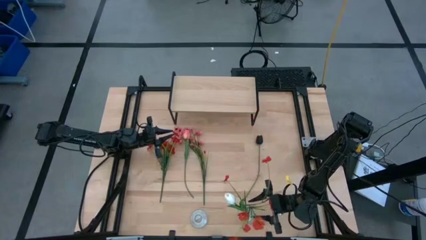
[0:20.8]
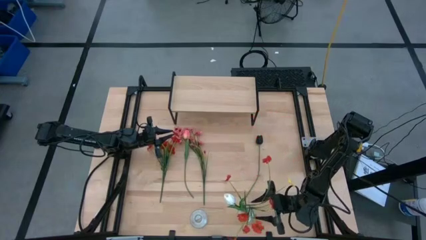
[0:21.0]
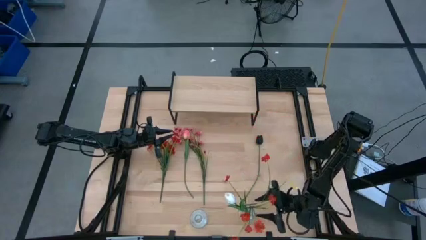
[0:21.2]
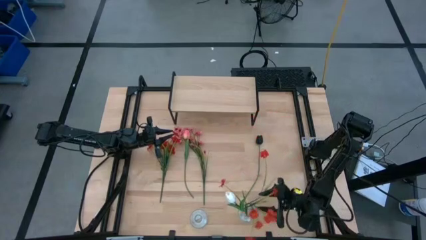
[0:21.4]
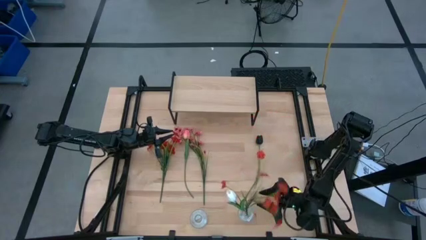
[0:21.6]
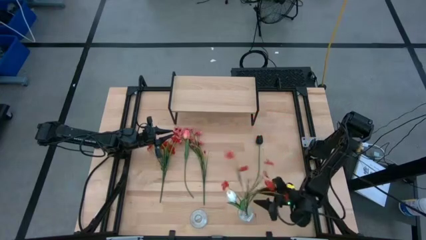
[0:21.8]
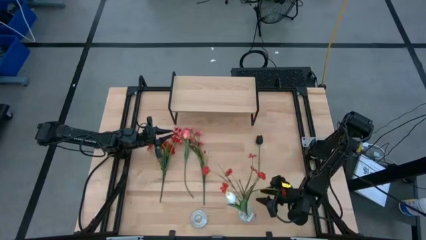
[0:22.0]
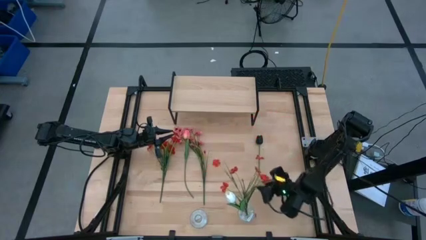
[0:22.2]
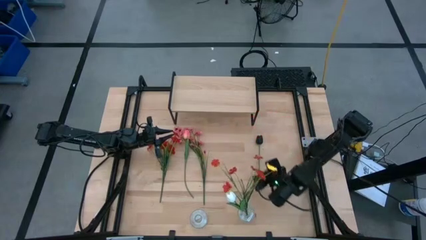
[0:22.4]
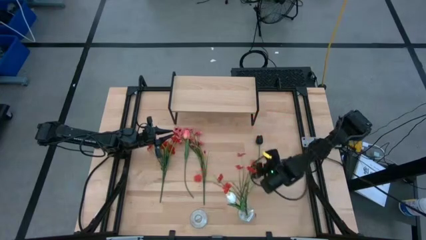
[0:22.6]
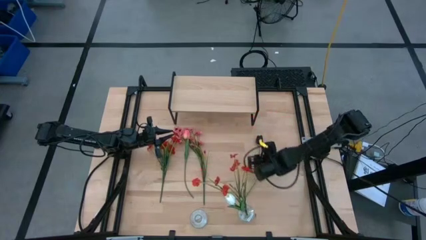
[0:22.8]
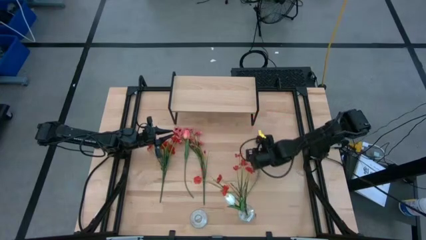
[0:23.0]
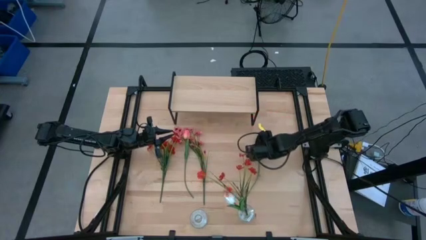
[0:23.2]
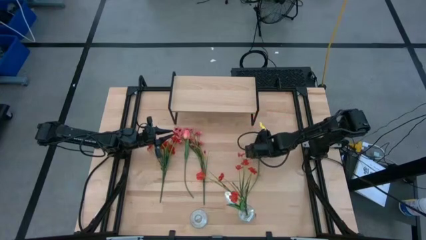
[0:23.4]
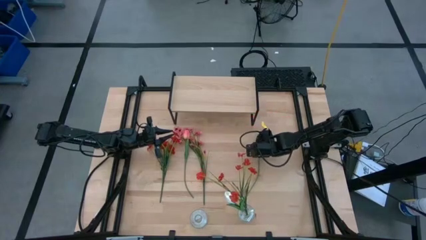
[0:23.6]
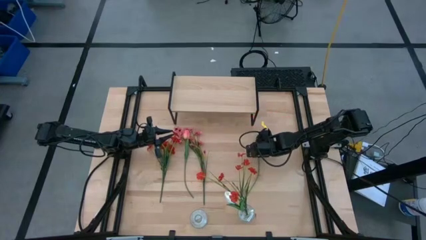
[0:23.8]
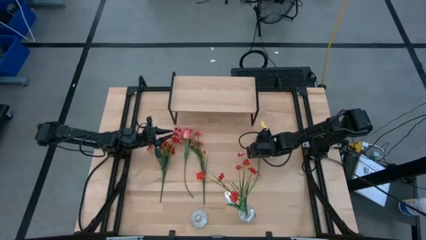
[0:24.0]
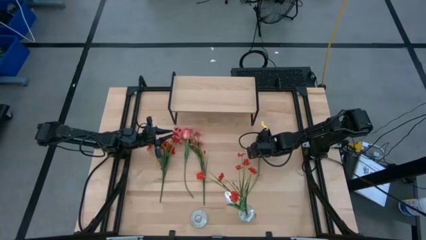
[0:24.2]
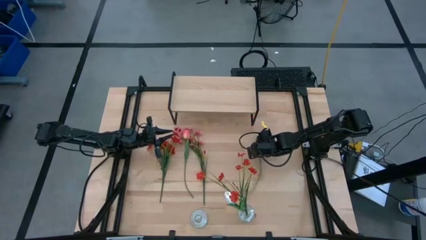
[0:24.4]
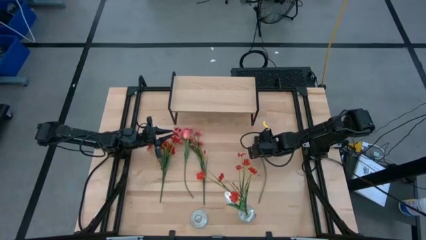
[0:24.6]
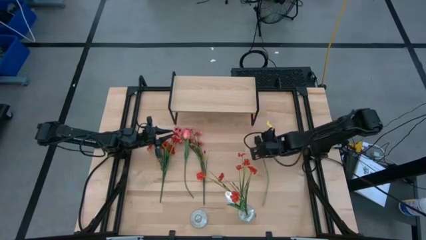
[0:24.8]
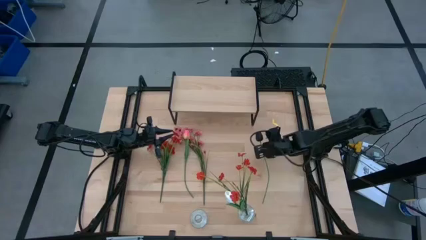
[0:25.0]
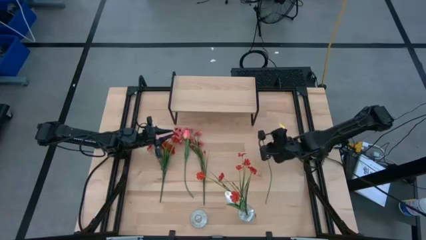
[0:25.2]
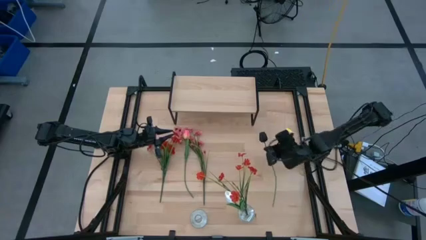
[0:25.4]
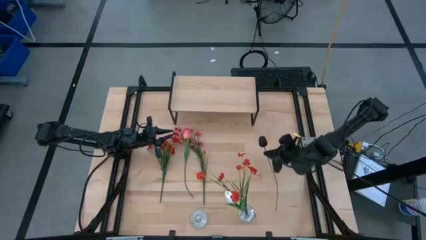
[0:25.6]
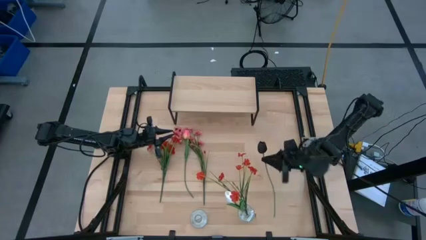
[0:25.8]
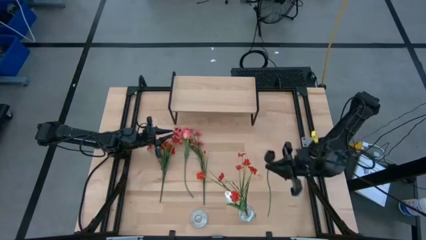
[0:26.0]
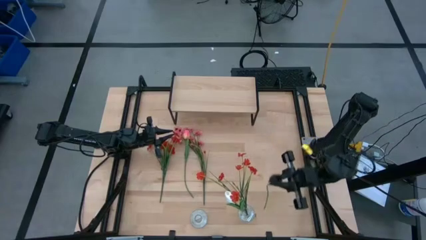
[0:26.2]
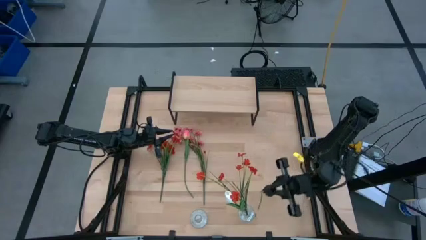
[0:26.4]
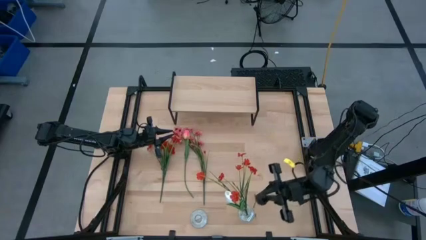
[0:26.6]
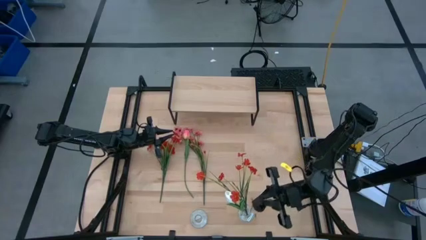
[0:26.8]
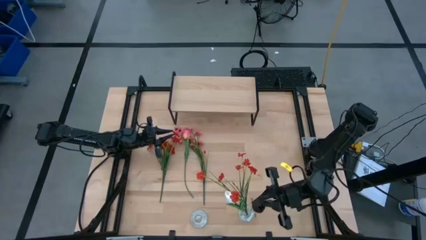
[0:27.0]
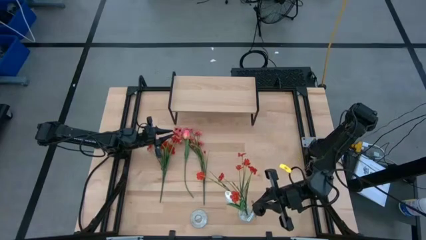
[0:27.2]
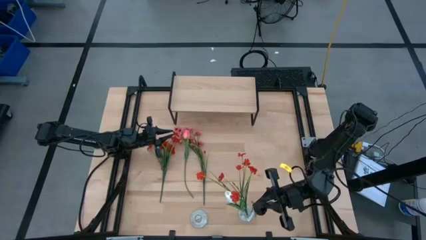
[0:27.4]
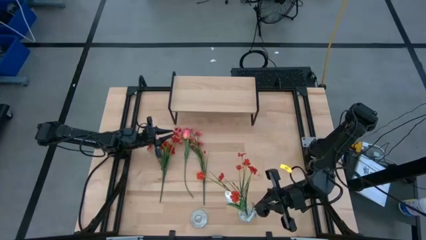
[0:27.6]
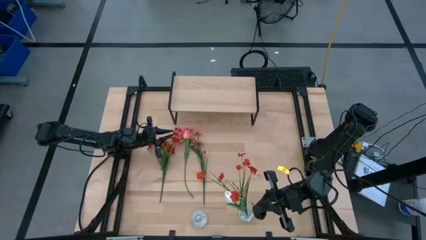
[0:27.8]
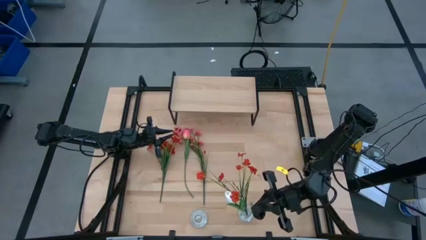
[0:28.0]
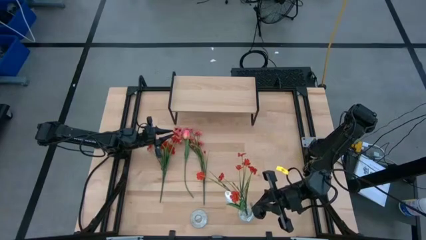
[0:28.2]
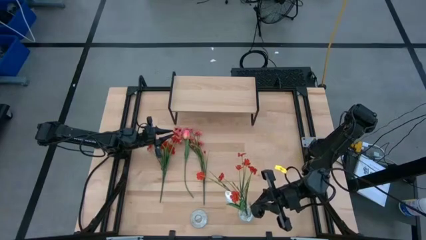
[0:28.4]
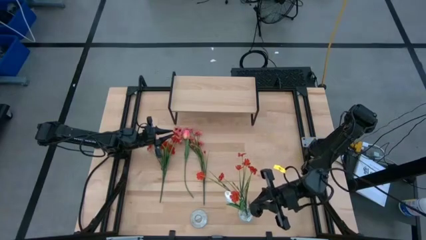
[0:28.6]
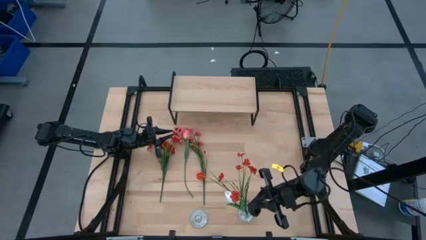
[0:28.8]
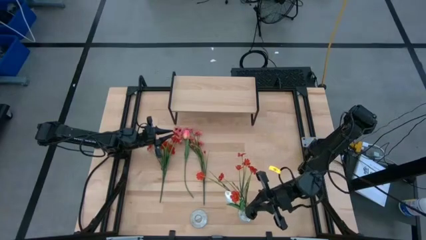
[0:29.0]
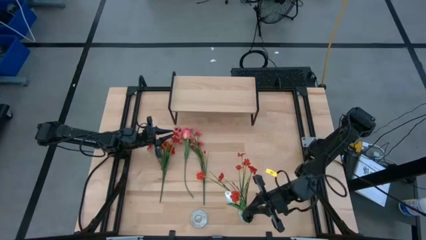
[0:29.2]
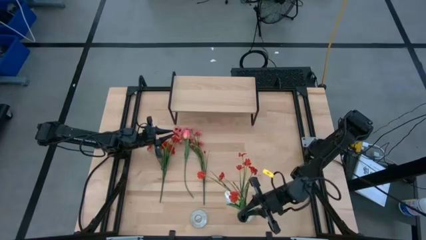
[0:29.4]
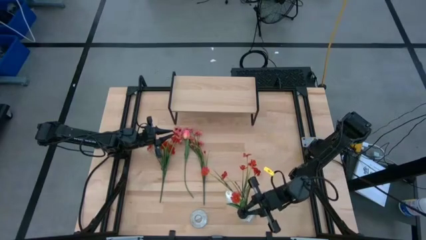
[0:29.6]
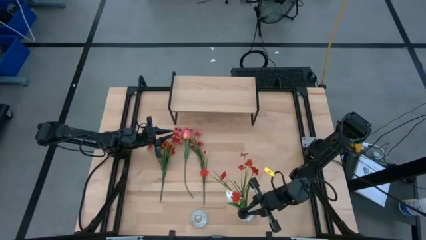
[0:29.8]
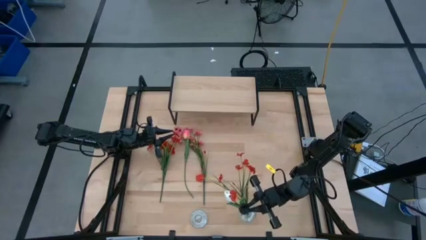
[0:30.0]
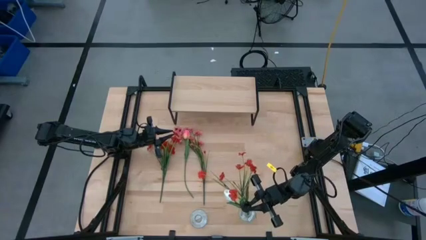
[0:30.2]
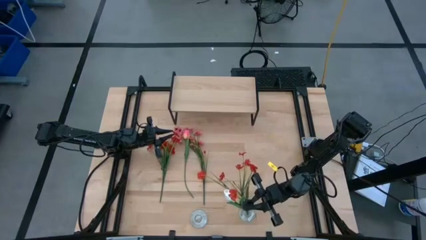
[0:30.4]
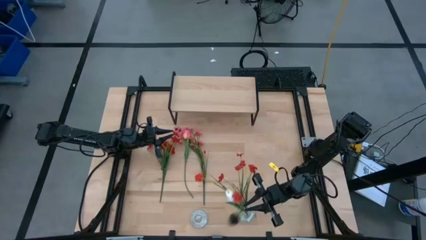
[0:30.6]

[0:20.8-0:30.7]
Task: Pick and place flowers into a vace then onto a shelf
Put the black flower into the right transparent vase
